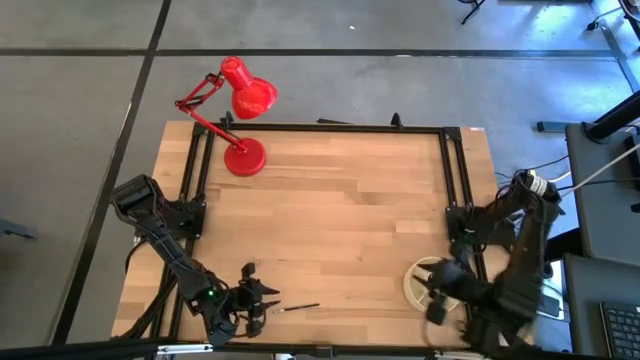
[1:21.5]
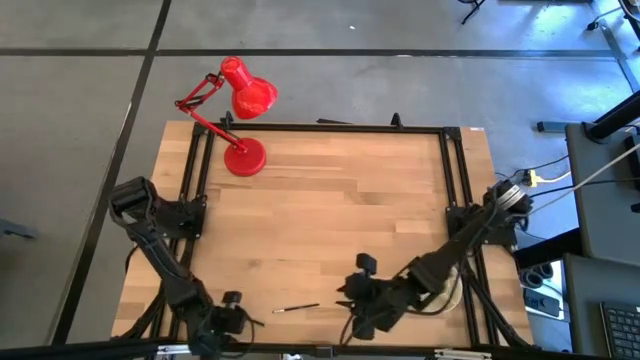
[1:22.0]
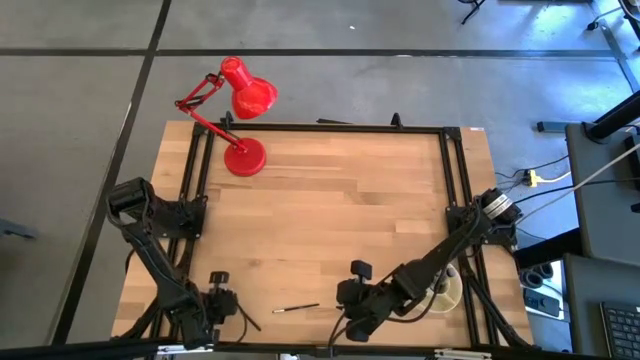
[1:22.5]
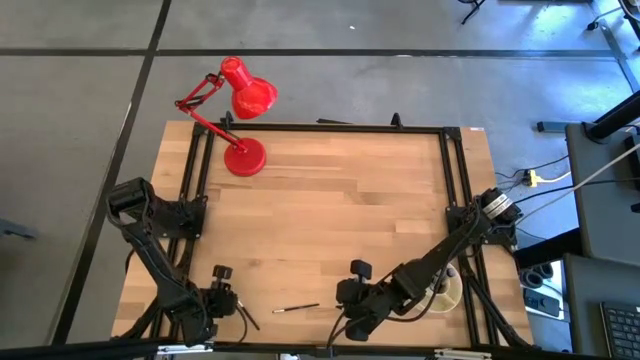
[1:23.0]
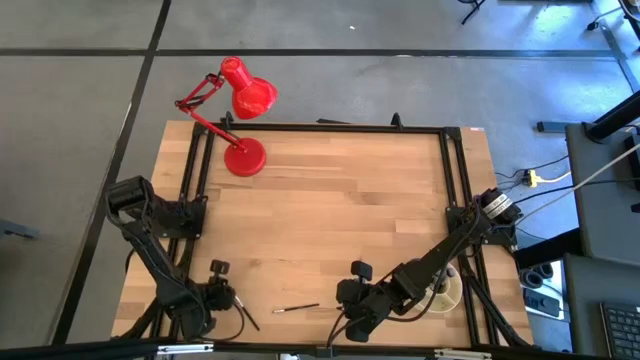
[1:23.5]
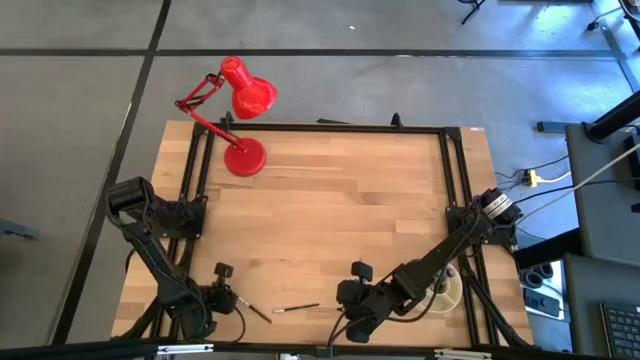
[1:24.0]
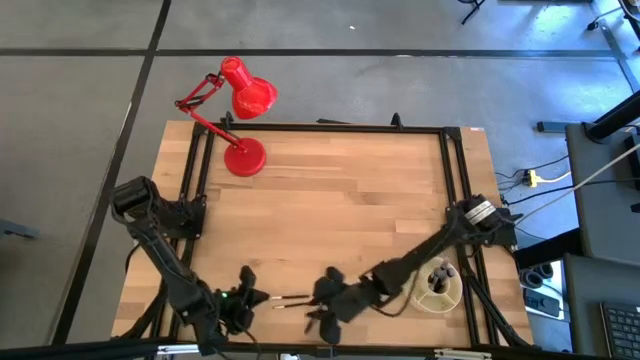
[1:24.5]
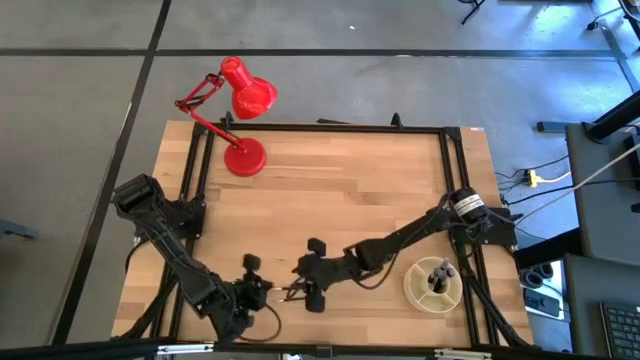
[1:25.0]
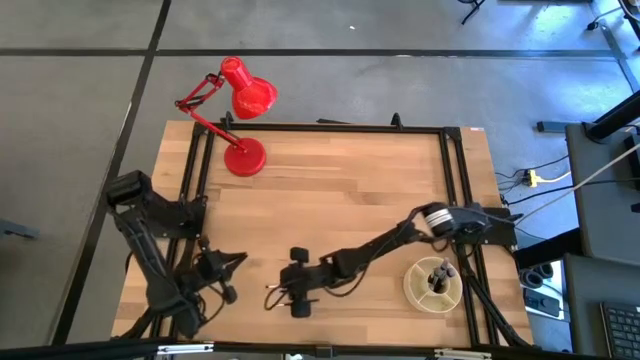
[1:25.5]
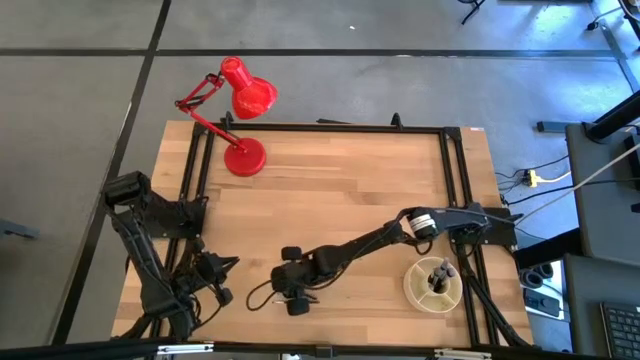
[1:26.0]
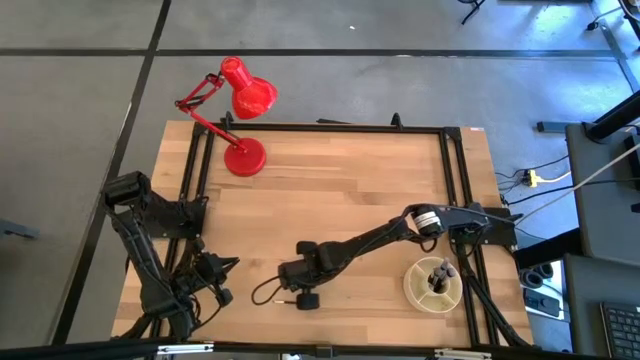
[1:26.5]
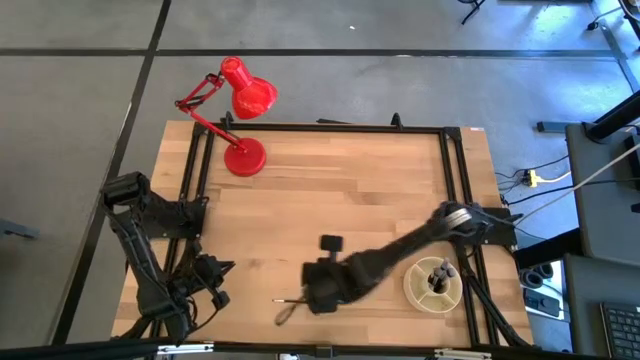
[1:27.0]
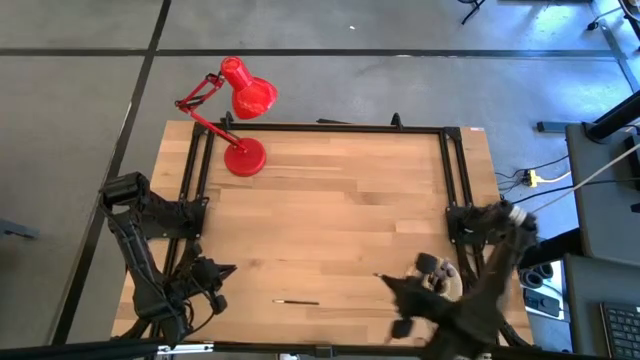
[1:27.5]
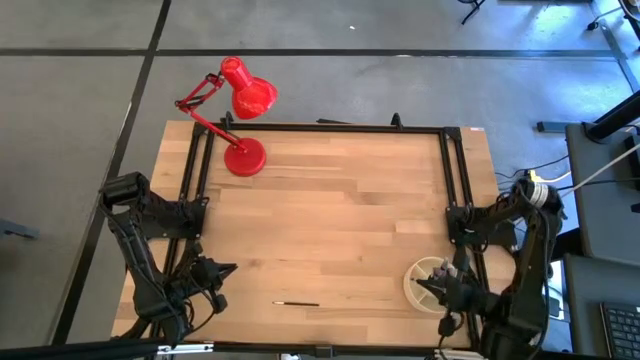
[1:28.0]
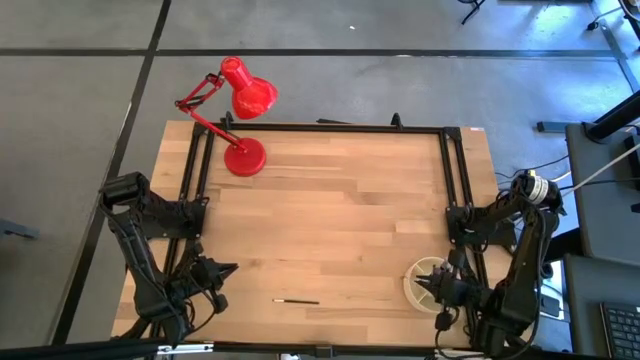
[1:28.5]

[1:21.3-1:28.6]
Task: Sort items
Put the eyeshadow brush into the brush organizer

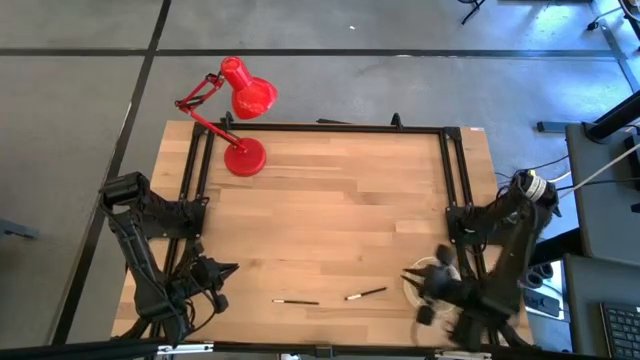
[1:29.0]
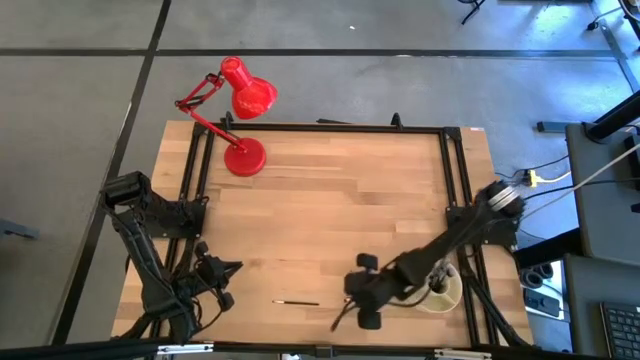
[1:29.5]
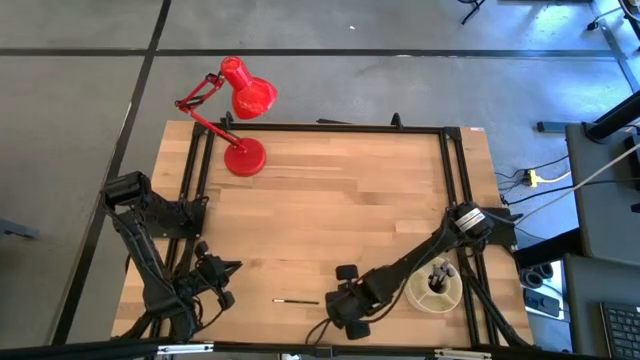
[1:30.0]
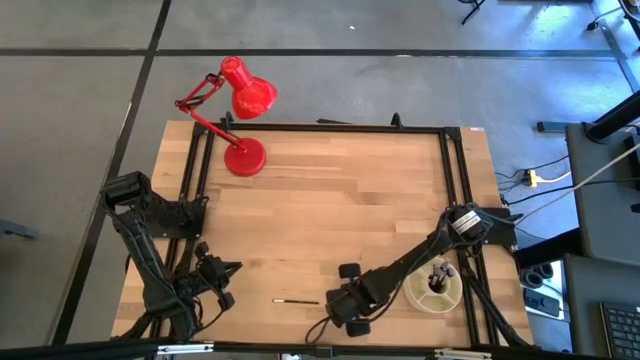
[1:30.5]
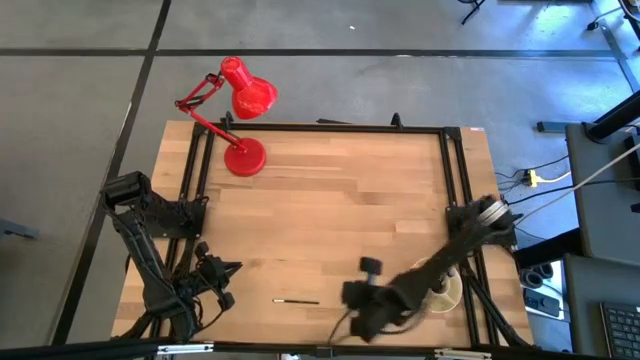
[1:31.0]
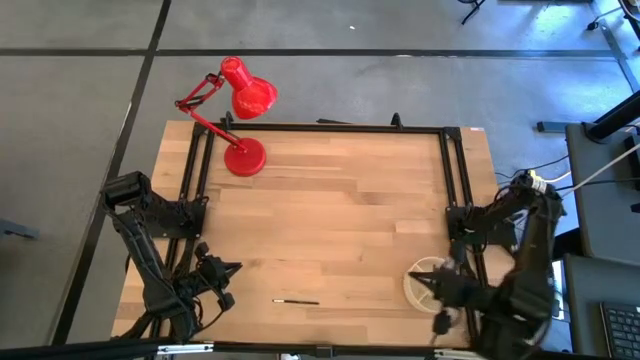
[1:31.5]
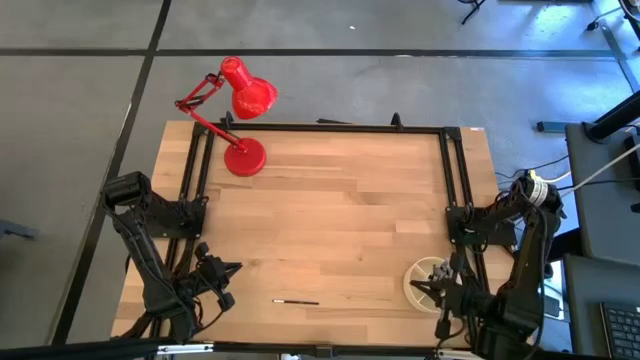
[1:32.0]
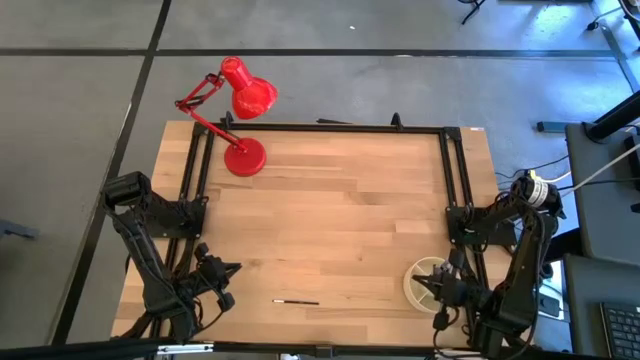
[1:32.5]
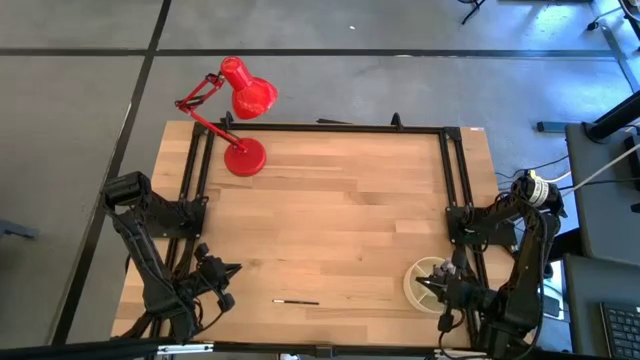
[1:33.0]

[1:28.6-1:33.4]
Put the eyeshadow brush into the brush organizer

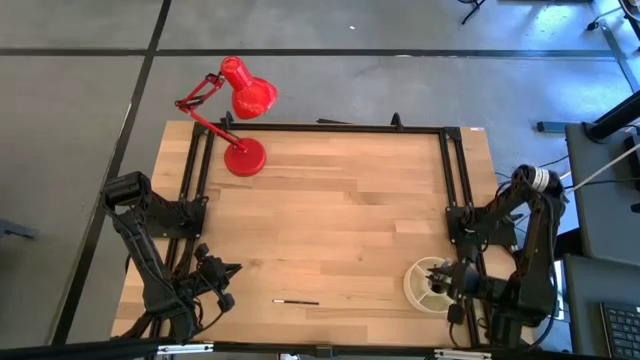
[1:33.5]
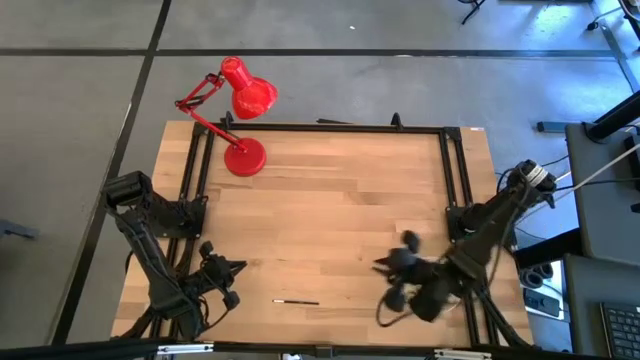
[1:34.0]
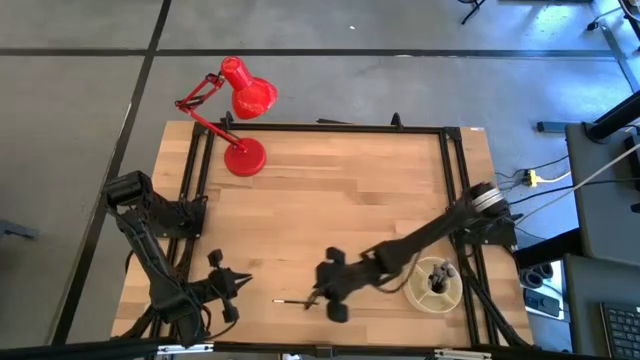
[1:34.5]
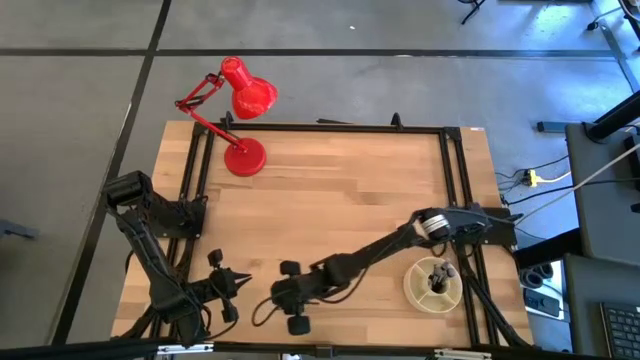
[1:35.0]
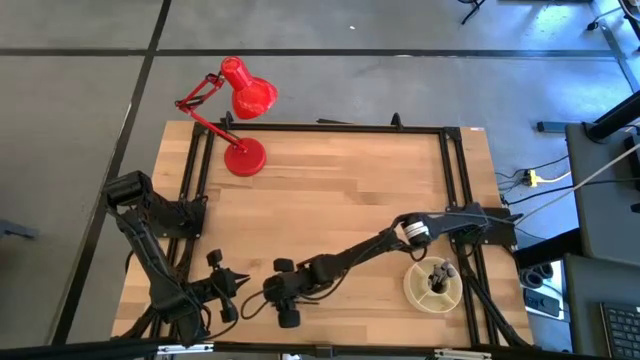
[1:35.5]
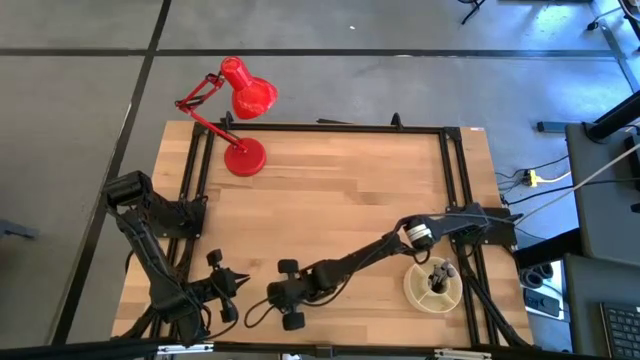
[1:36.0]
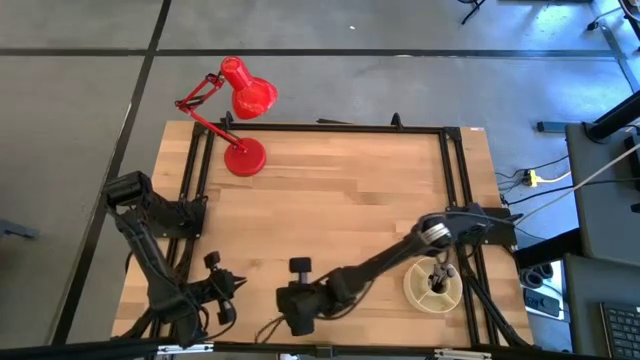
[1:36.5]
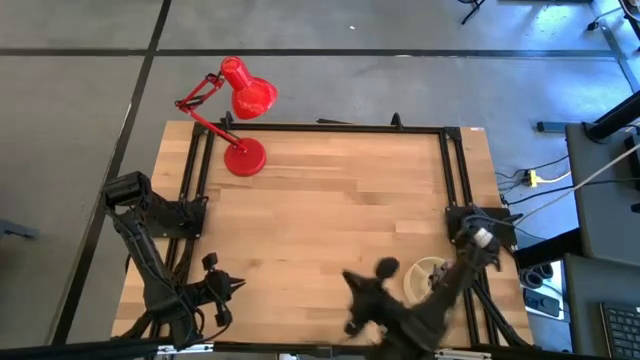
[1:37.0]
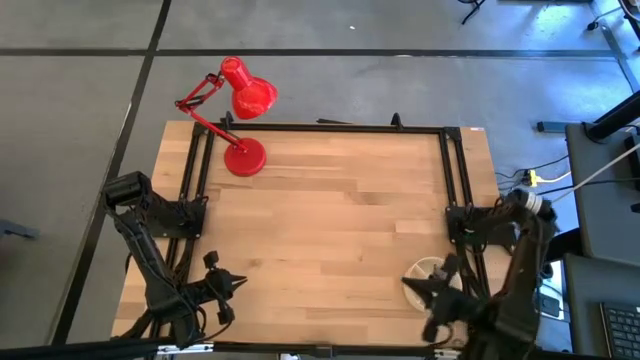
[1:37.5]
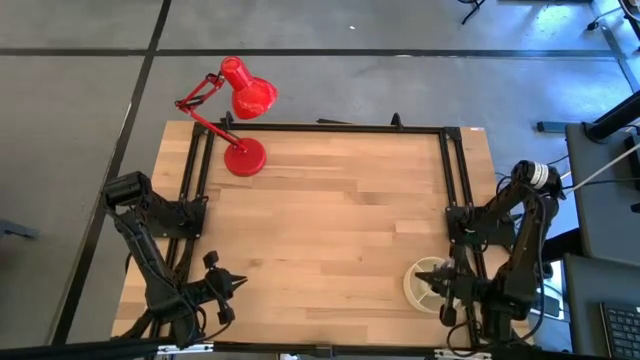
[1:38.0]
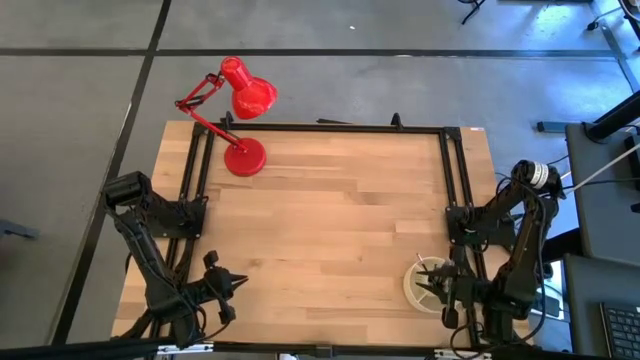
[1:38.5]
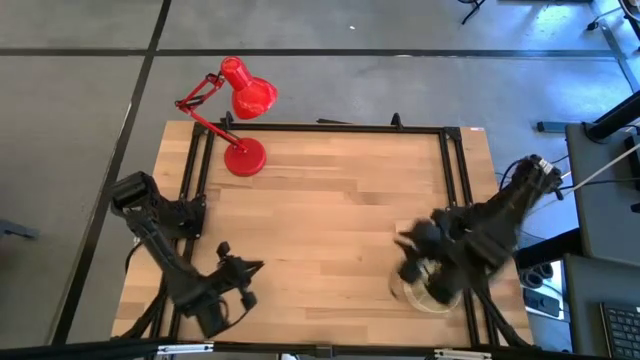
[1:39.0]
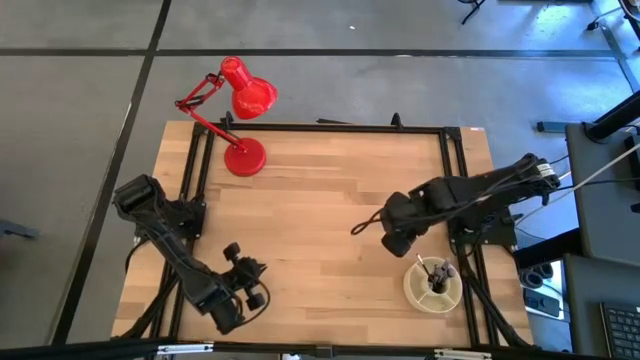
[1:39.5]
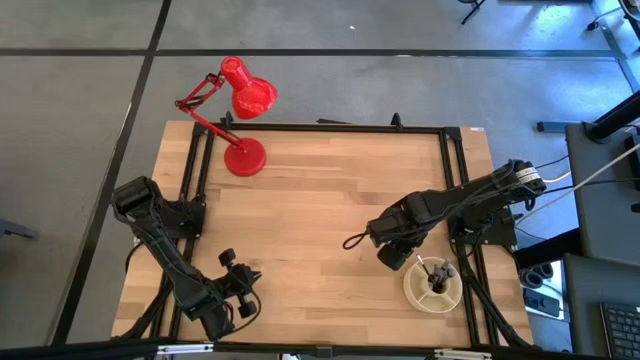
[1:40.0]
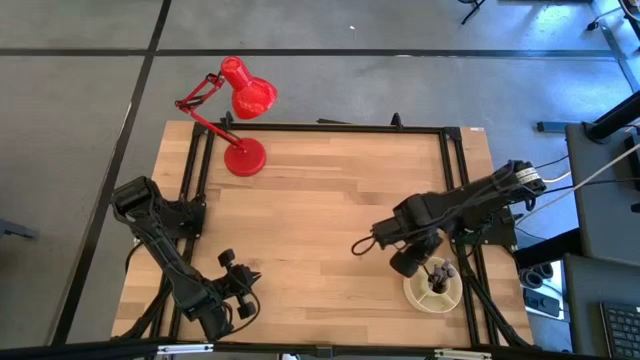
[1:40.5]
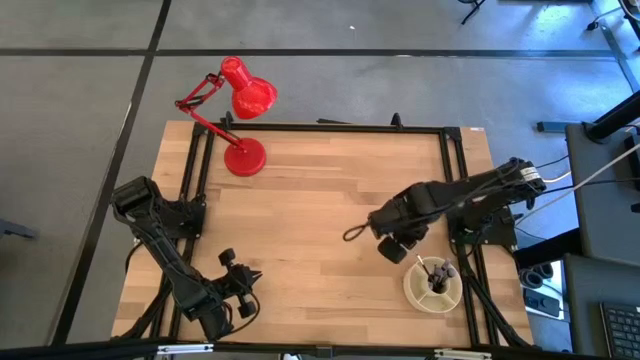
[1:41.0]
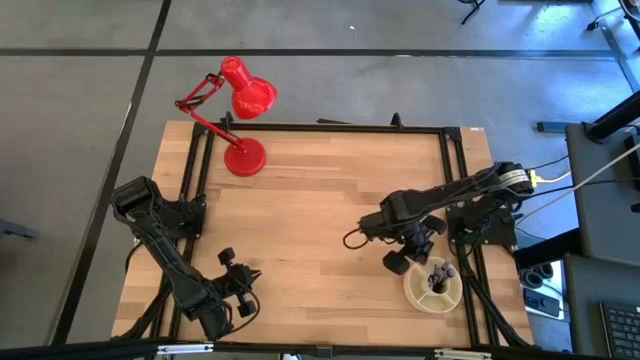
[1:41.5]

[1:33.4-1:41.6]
Put the eyeshadow brush into the brush organizer

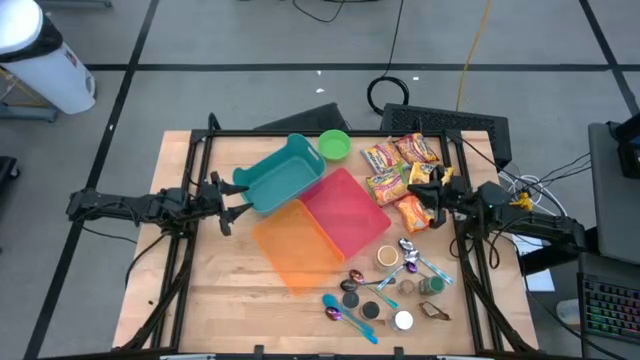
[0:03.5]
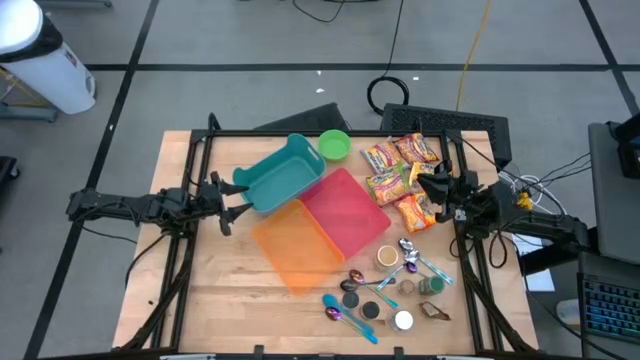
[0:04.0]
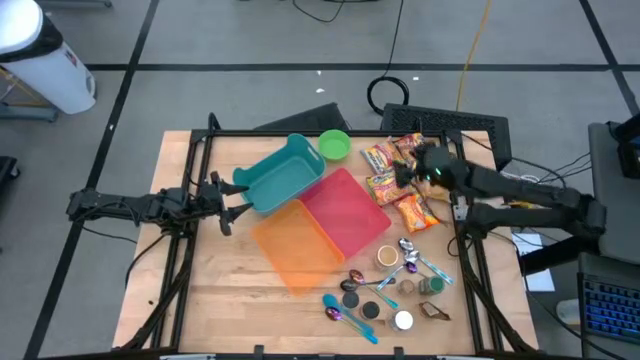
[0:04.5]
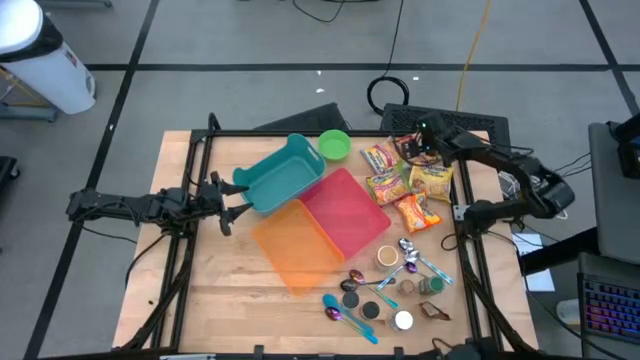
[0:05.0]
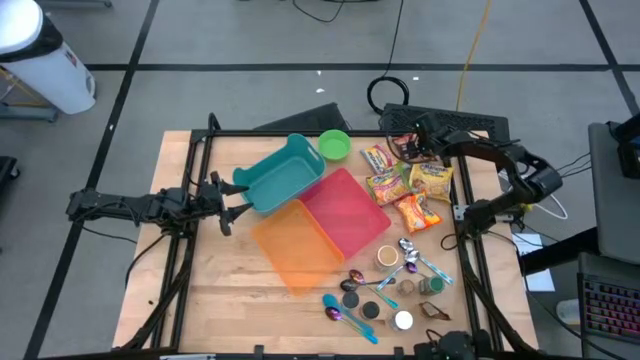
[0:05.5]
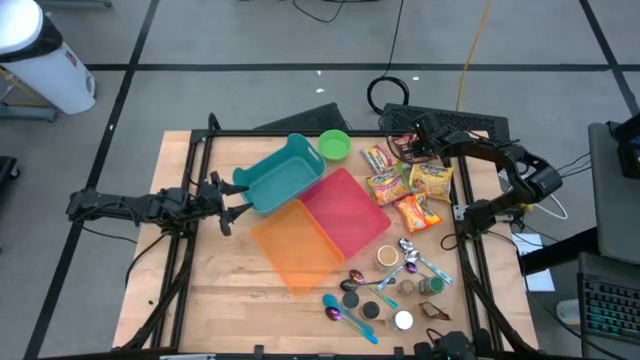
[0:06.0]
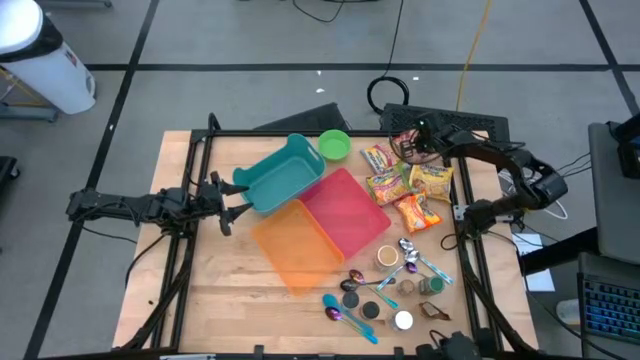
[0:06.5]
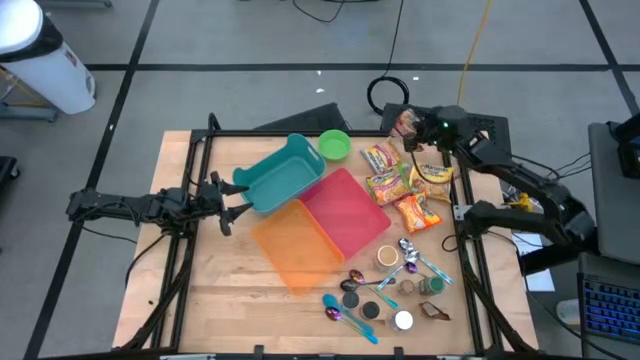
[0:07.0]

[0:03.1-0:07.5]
Task: Pick & Place Food Item
Put the red noodle pack into the red bin
